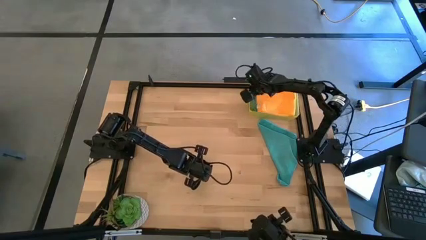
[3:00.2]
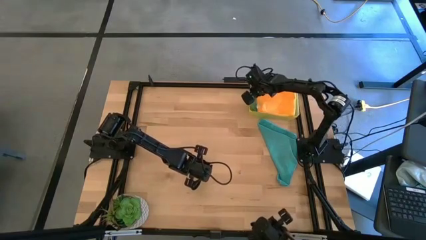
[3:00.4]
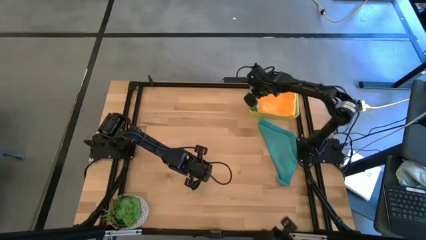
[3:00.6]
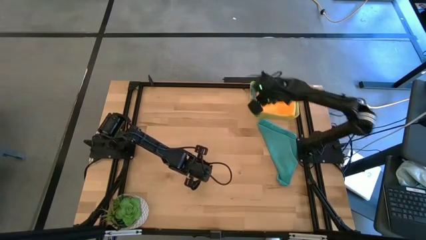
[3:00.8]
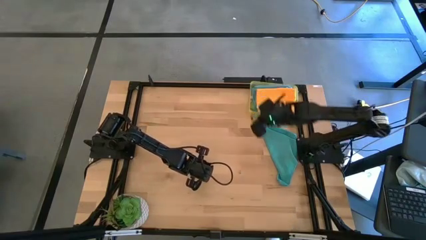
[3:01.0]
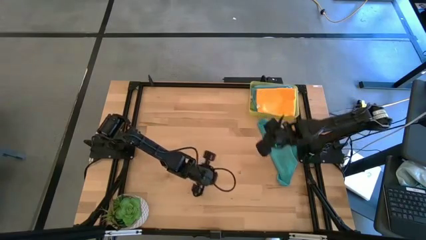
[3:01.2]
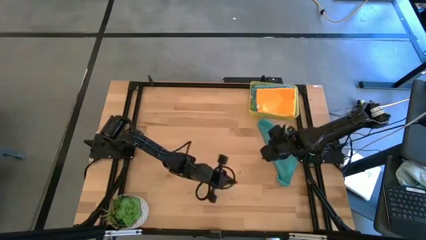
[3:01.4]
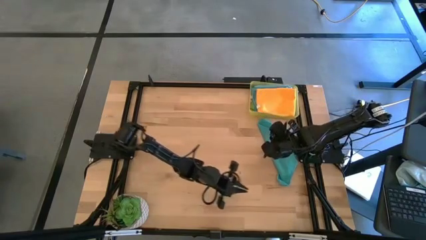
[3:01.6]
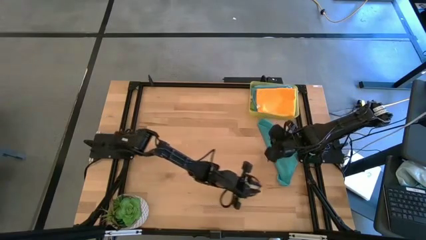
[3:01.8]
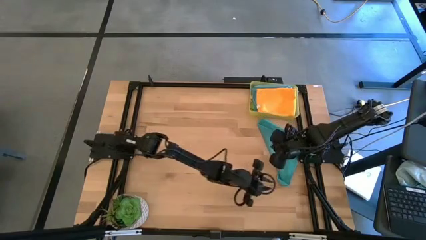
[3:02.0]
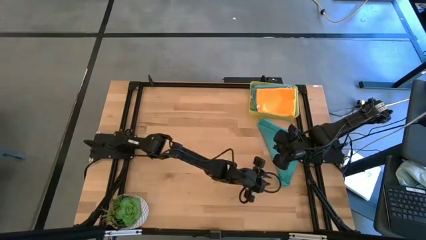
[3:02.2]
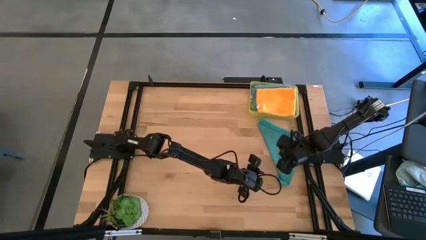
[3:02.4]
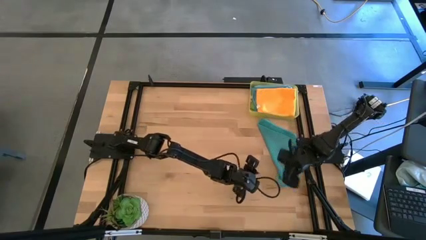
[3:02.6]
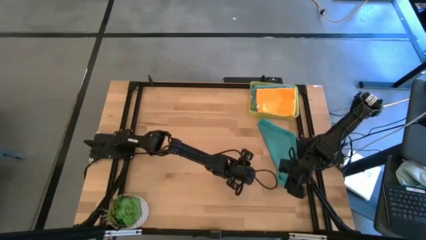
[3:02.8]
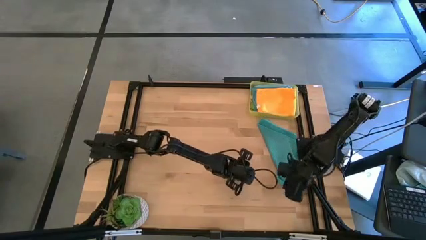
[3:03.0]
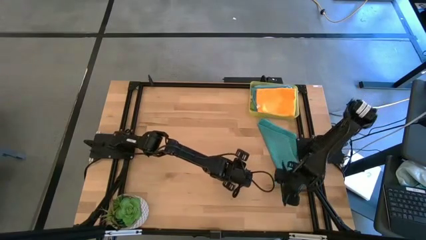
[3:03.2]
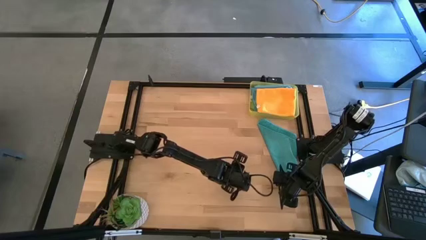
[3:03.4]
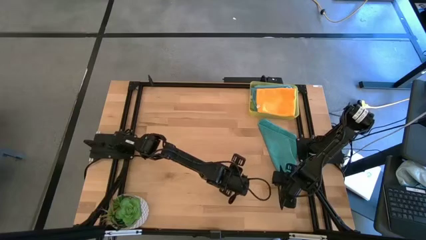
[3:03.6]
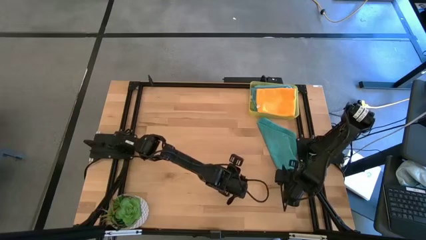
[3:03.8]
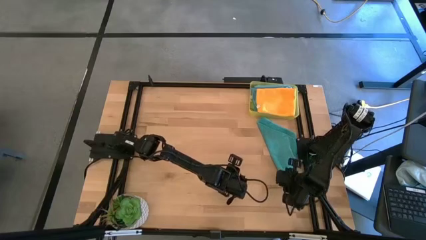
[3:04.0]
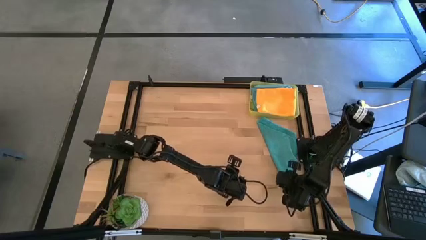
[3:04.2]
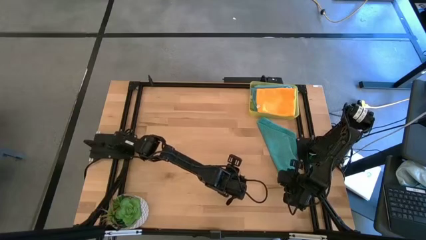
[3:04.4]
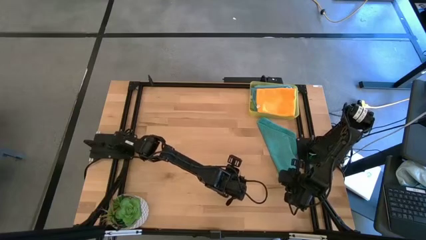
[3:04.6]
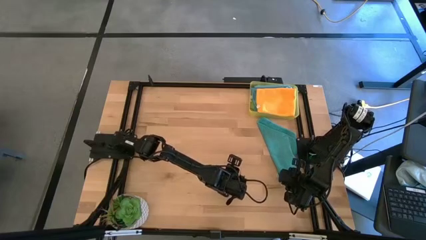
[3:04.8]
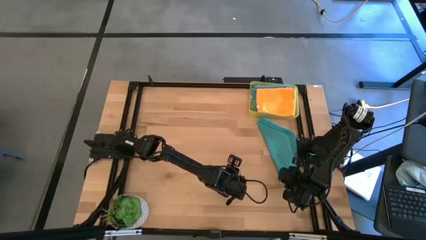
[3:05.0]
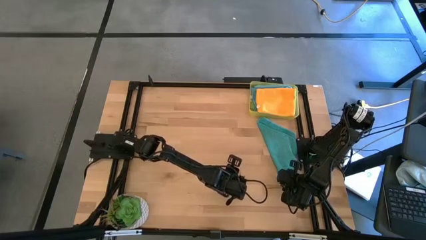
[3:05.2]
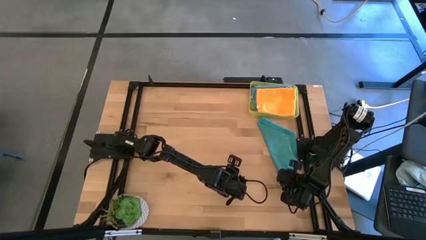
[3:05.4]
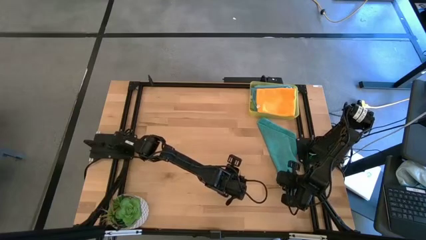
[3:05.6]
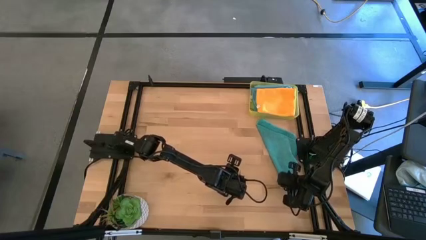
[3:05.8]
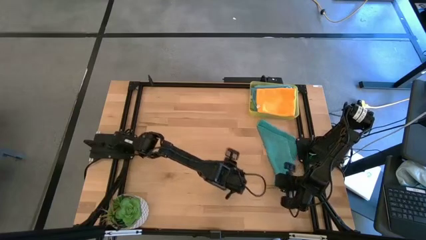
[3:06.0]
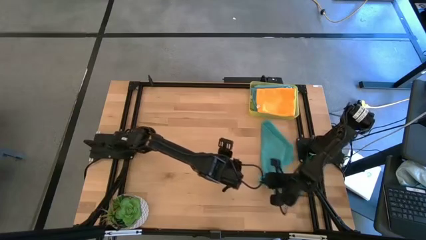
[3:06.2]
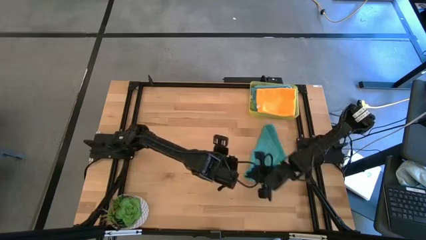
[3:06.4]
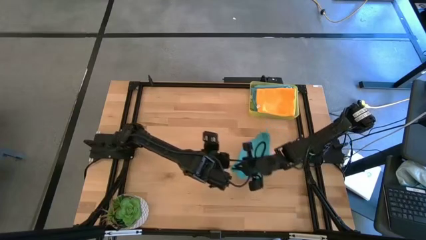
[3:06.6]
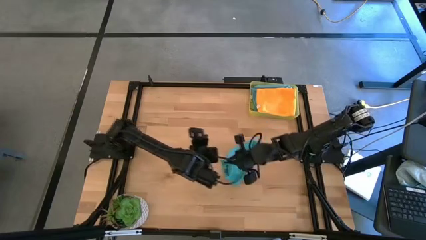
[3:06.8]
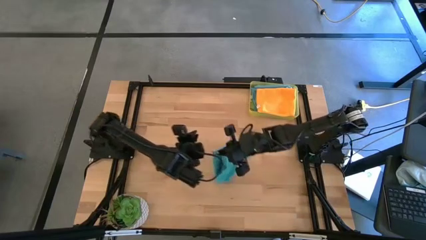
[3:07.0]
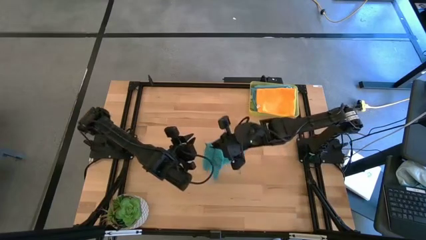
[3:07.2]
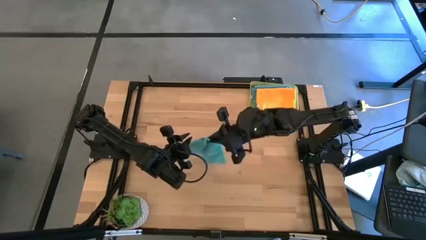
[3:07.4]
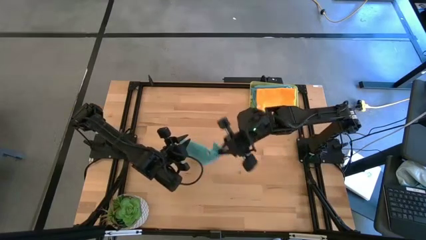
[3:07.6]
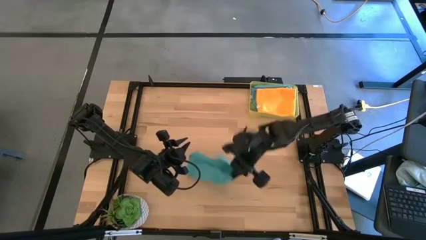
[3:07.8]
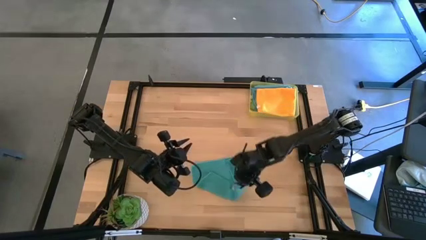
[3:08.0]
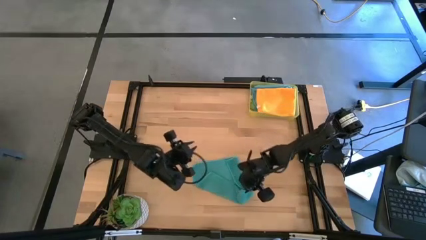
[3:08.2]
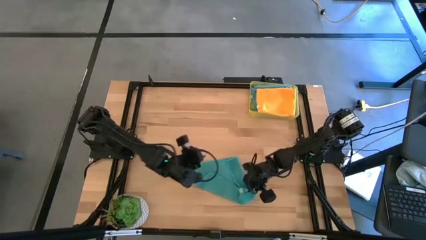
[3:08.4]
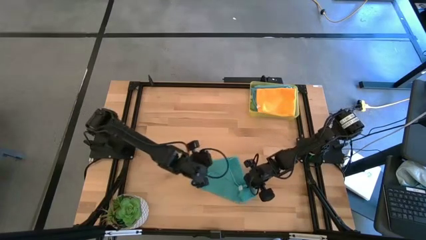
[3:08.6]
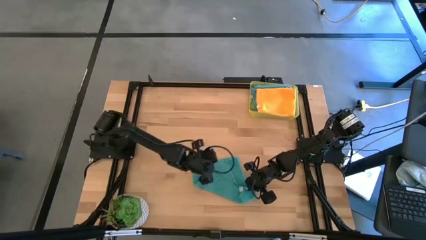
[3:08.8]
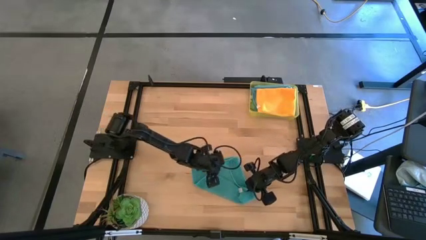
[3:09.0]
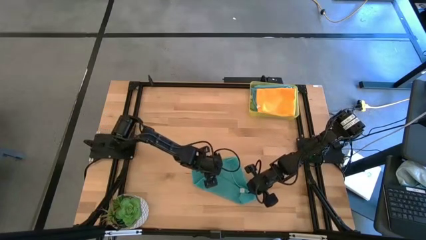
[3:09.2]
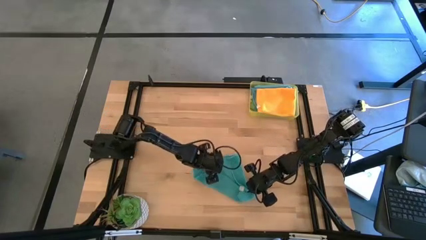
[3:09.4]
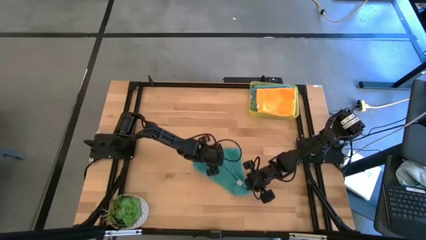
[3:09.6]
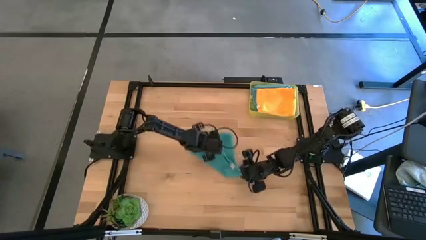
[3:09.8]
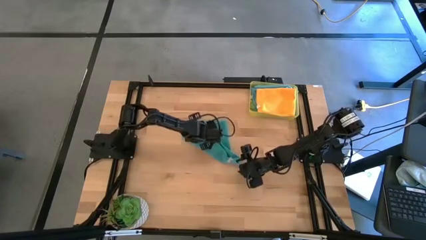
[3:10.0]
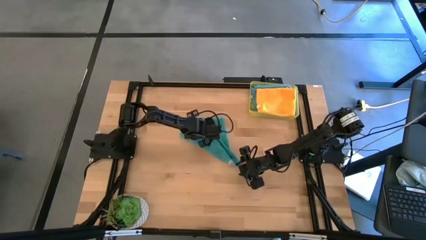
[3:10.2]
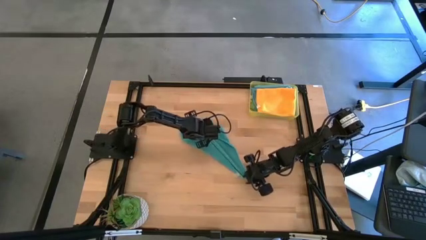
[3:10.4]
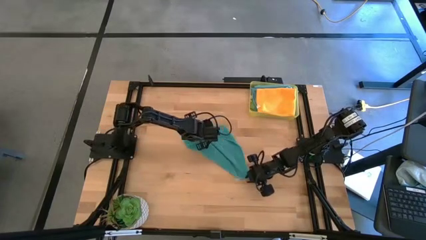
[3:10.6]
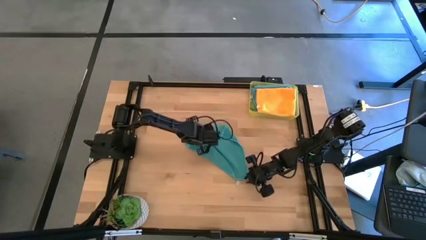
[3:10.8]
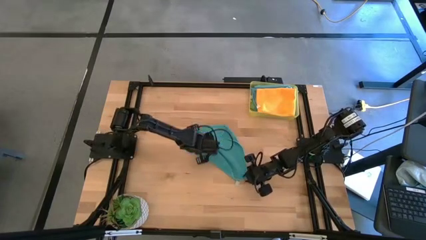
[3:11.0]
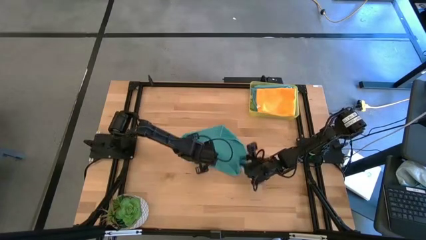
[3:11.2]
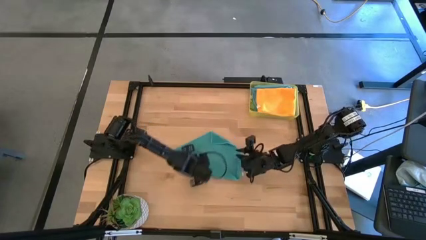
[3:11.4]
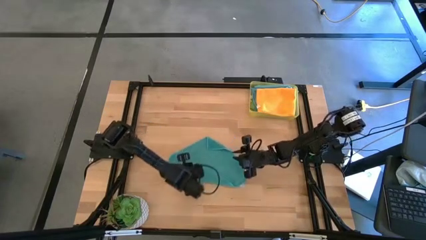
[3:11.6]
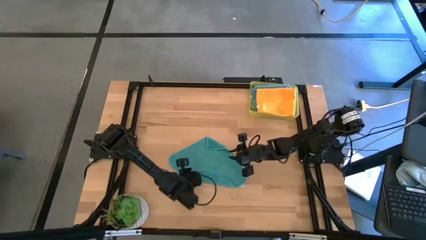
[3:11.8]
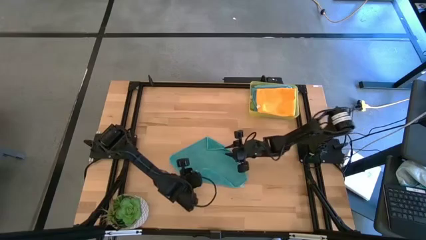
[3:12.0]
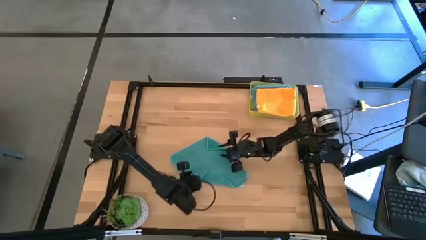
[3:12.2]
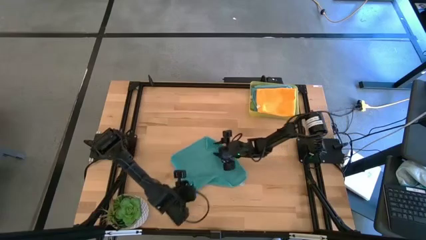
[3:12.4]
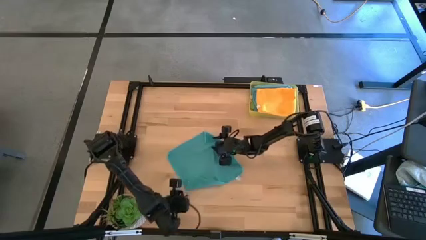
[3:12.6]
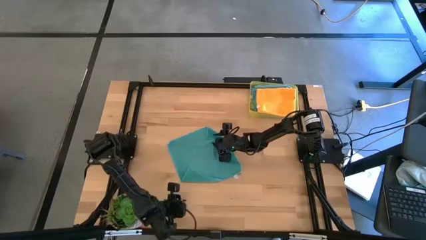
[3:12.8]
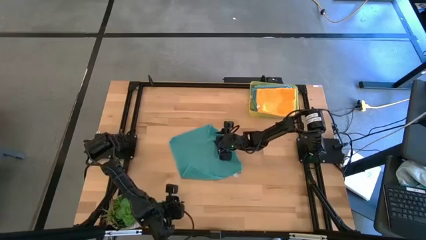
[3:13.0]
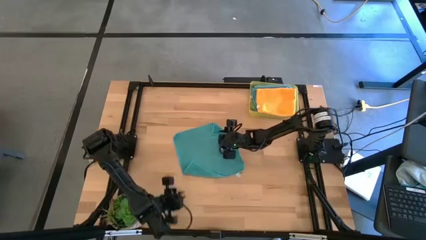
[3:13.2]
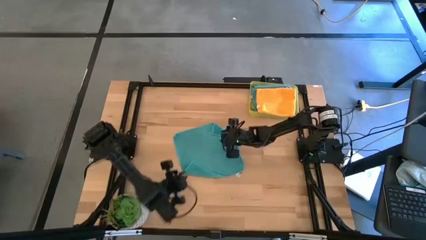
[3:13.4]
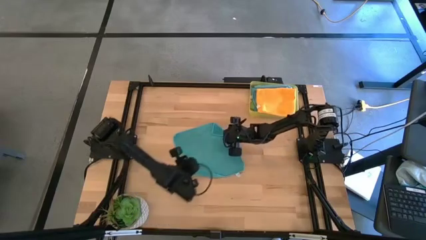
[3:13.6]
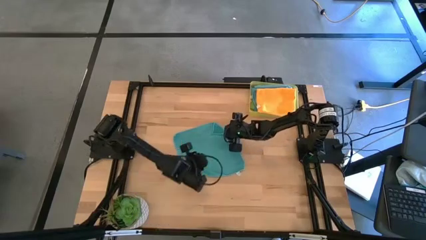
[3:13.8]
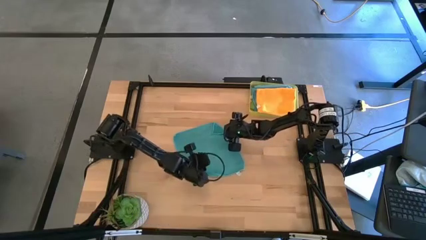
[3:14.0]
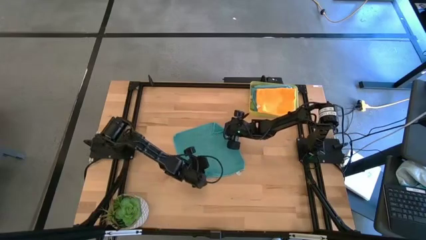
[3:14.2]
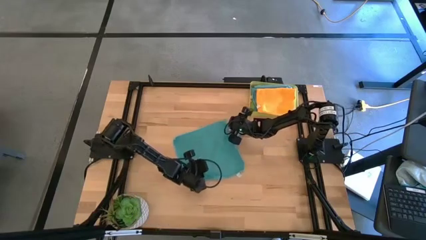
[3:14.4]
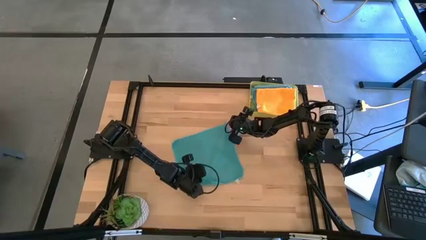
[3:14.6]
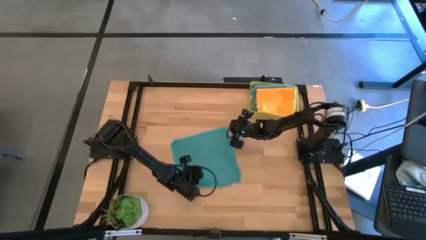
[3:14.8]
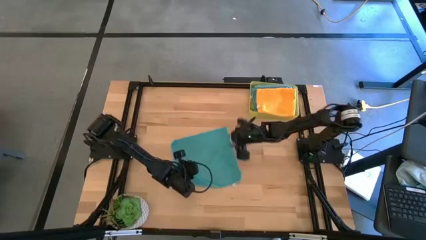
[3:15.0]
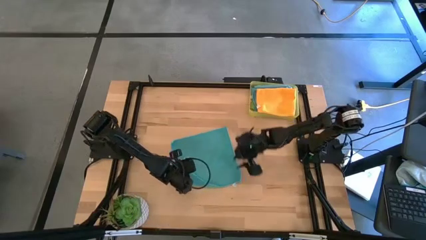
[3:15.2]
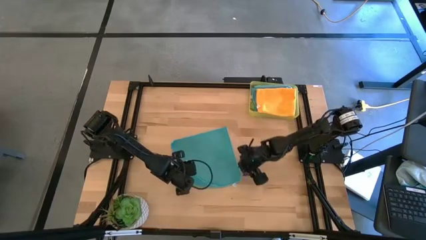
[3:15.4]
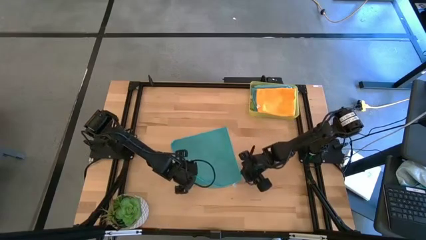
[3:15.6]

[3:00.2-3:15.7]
Task: Fold microfiber towels
Fold the blue microfiber cloth
